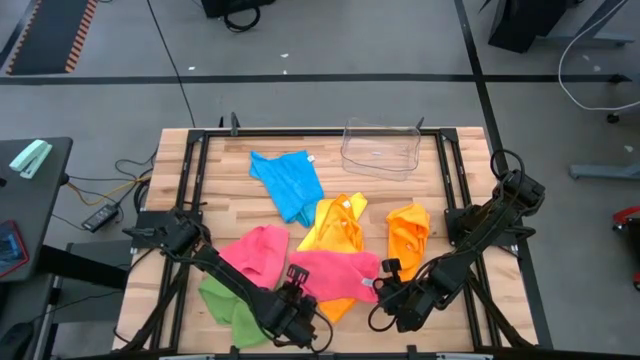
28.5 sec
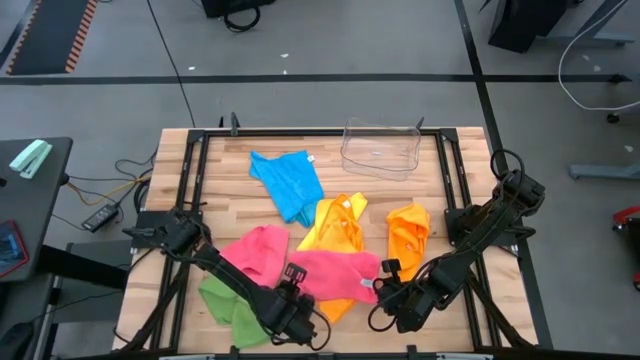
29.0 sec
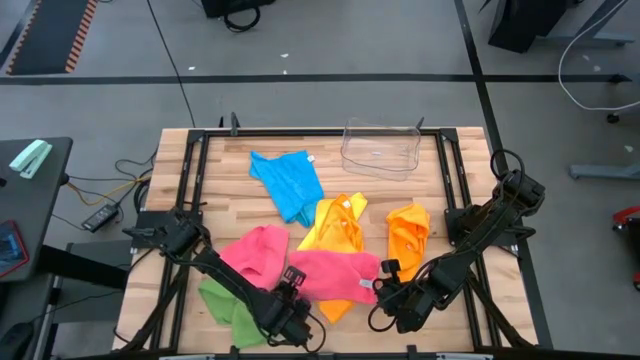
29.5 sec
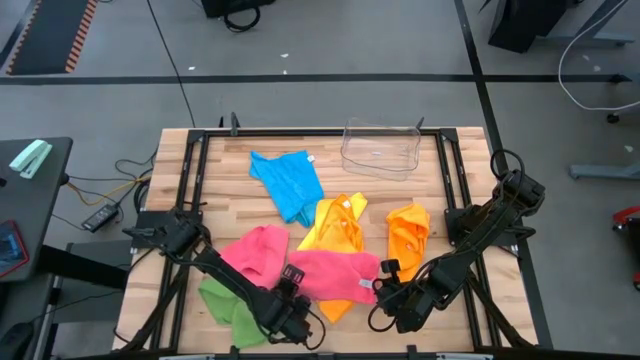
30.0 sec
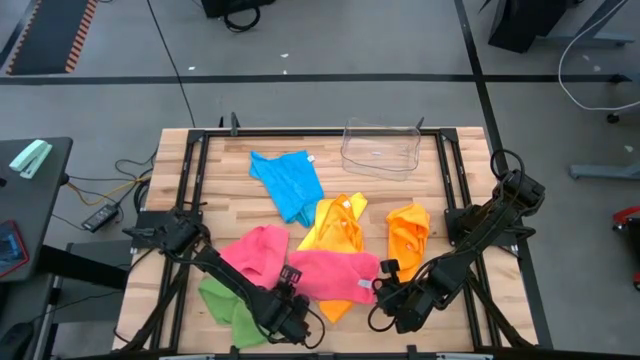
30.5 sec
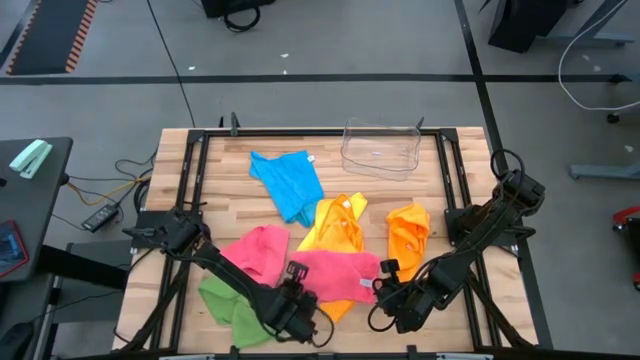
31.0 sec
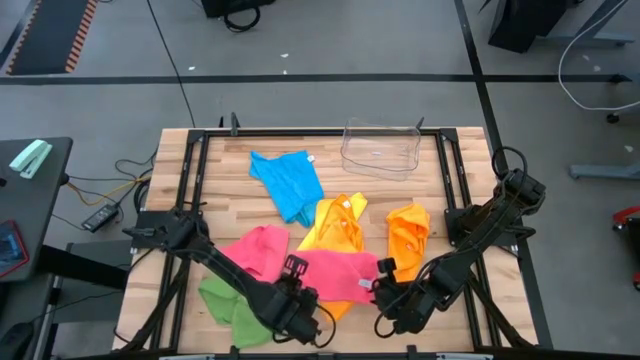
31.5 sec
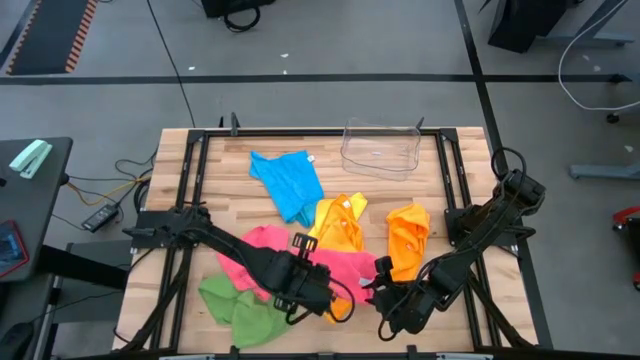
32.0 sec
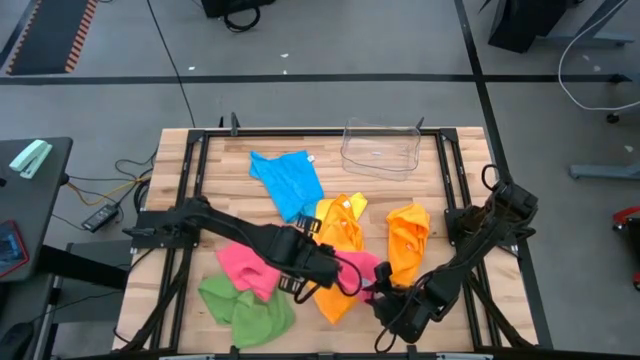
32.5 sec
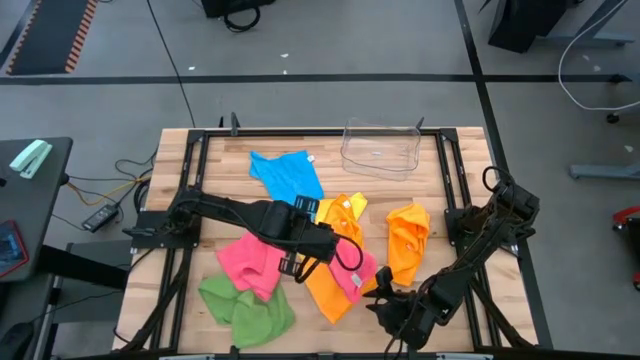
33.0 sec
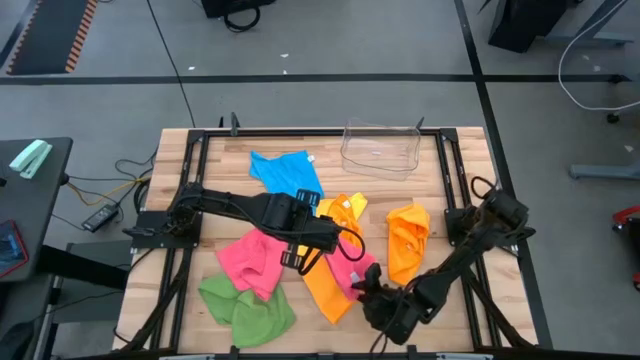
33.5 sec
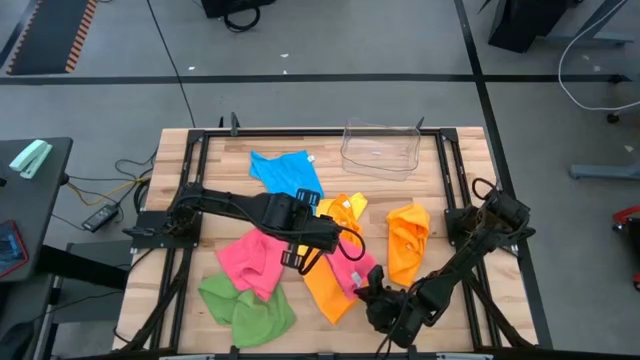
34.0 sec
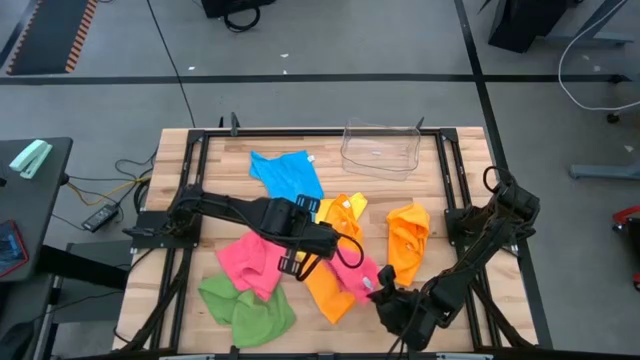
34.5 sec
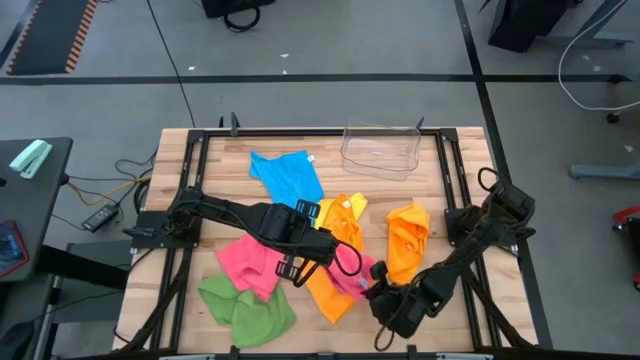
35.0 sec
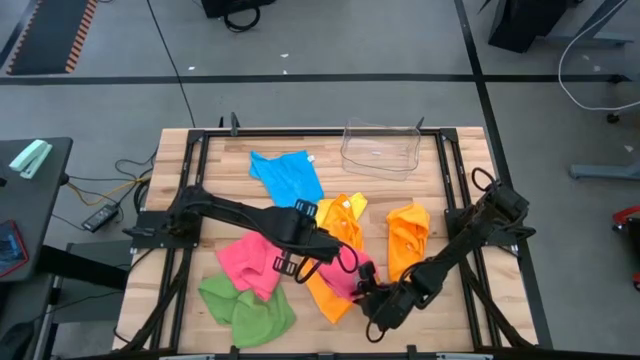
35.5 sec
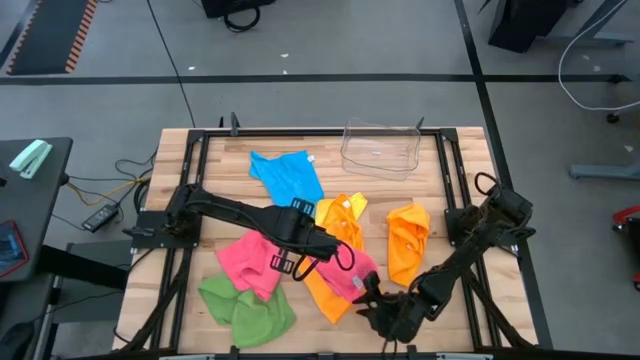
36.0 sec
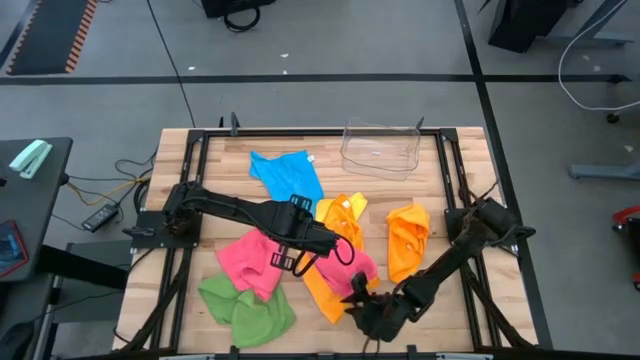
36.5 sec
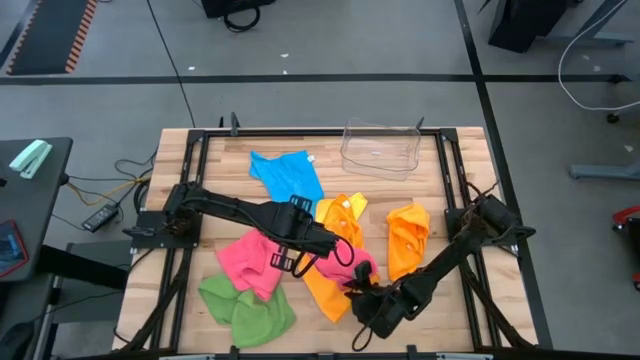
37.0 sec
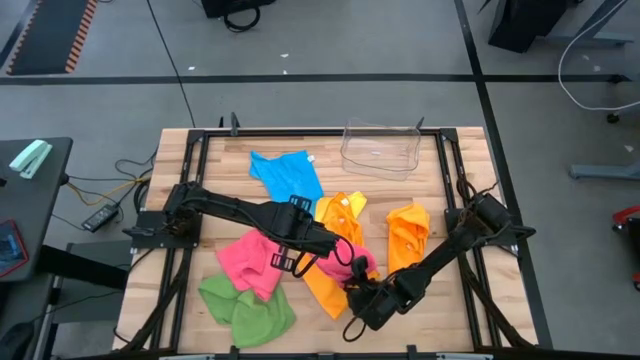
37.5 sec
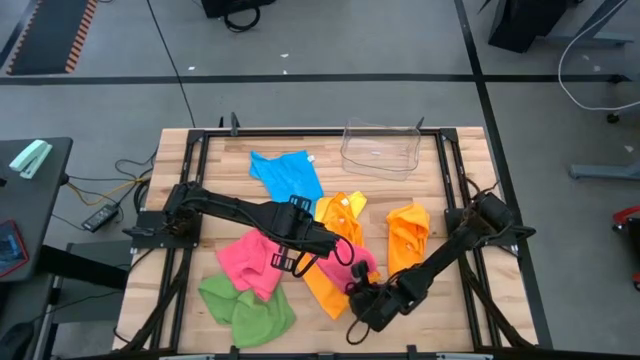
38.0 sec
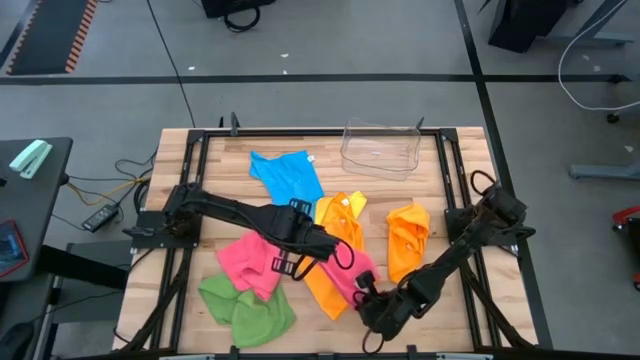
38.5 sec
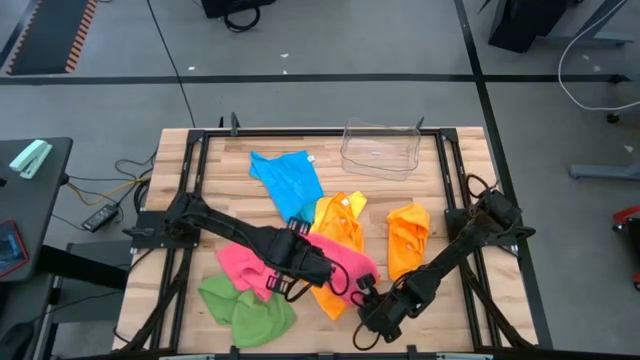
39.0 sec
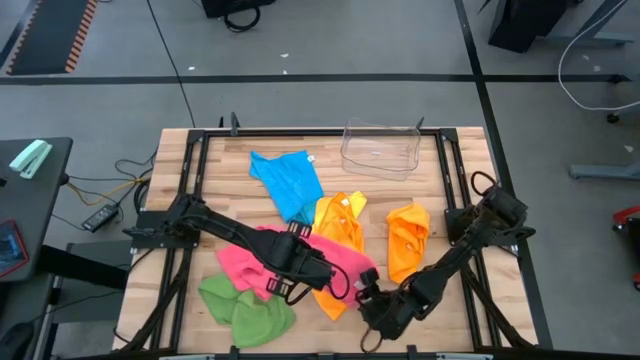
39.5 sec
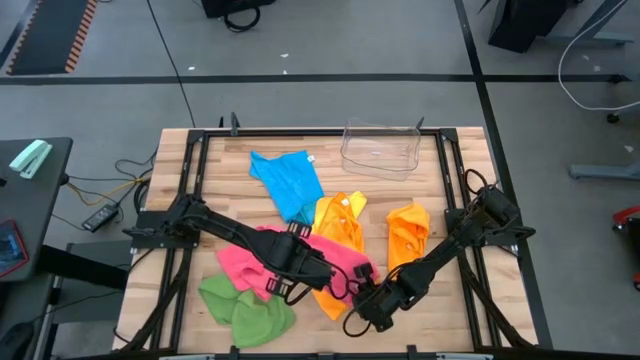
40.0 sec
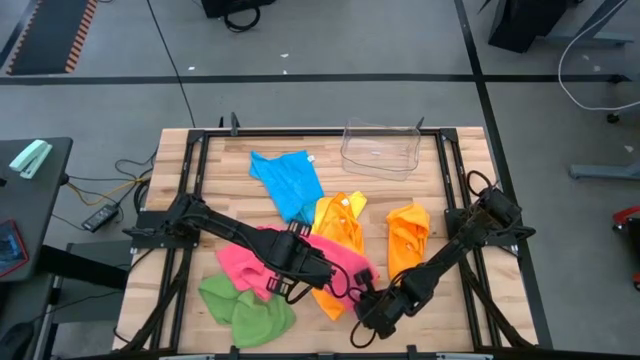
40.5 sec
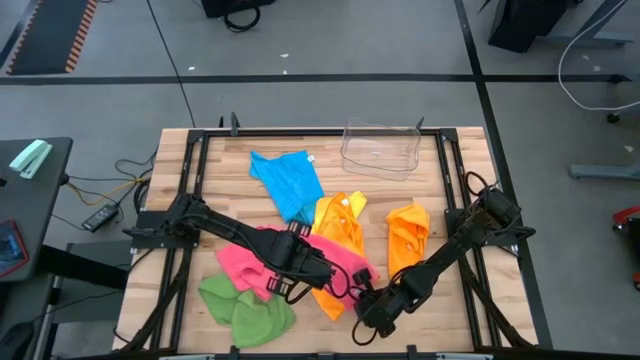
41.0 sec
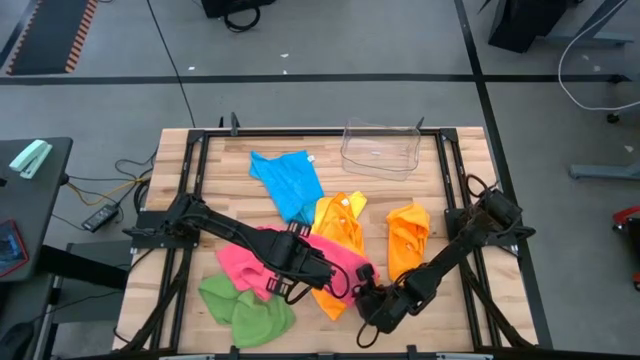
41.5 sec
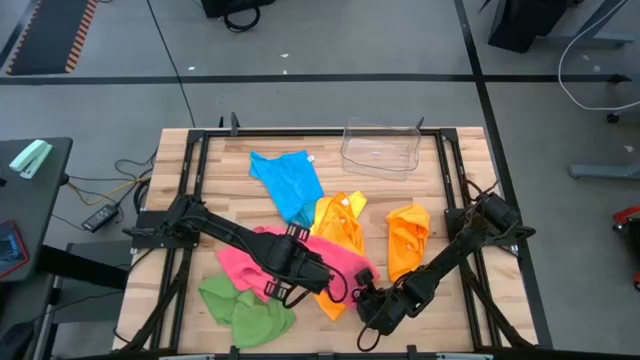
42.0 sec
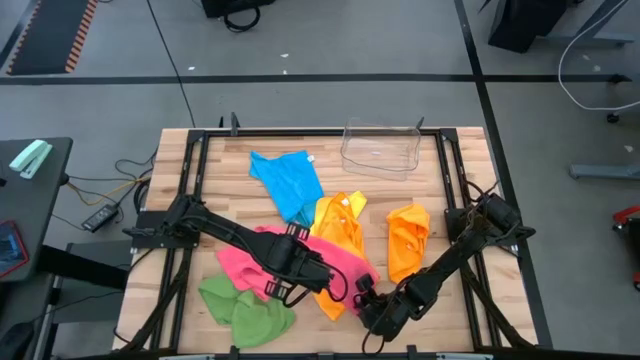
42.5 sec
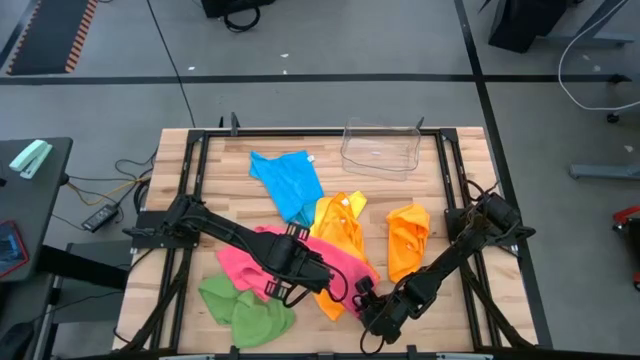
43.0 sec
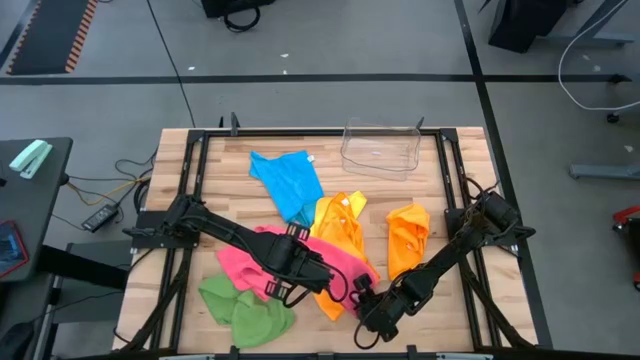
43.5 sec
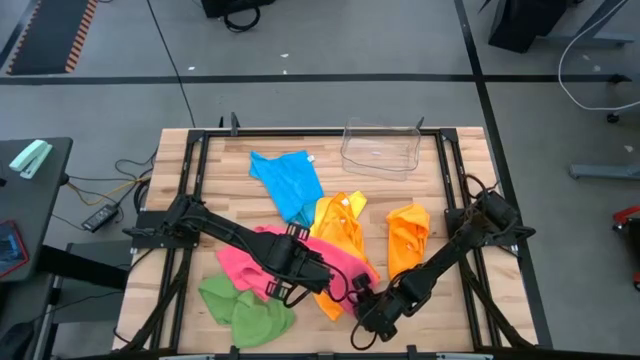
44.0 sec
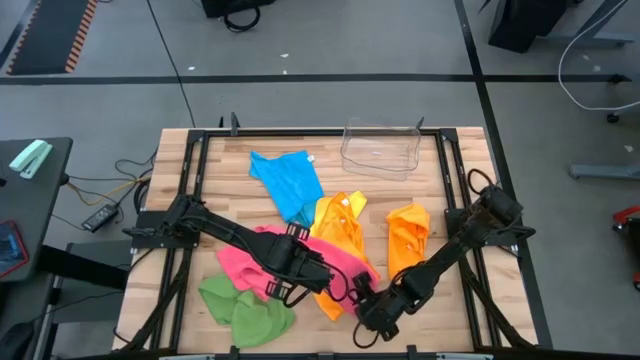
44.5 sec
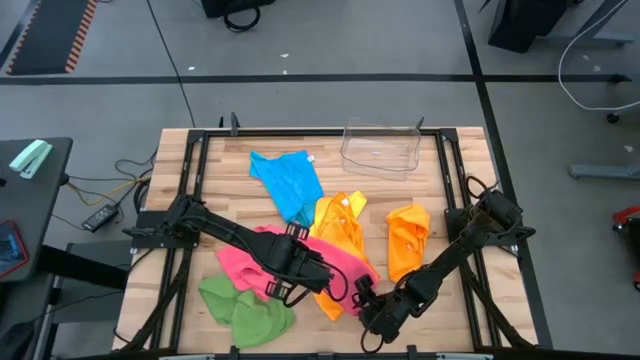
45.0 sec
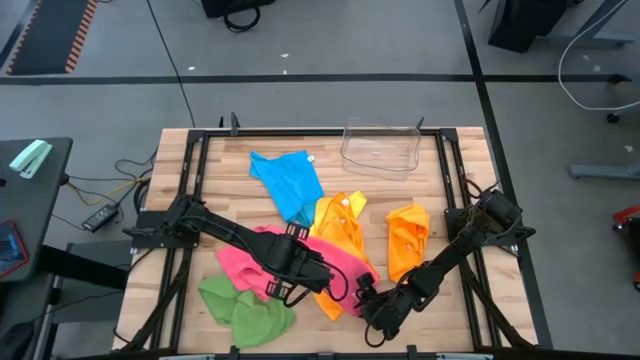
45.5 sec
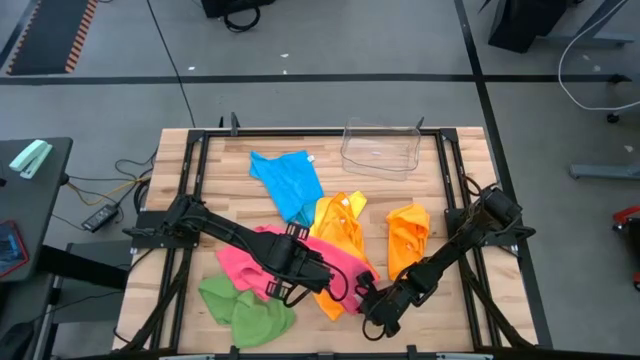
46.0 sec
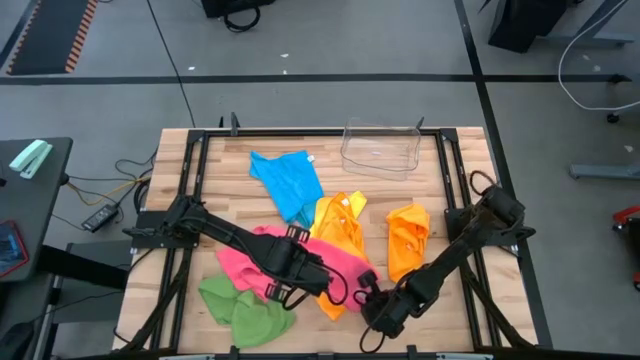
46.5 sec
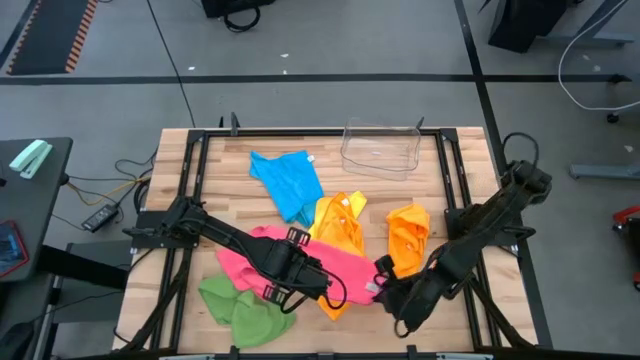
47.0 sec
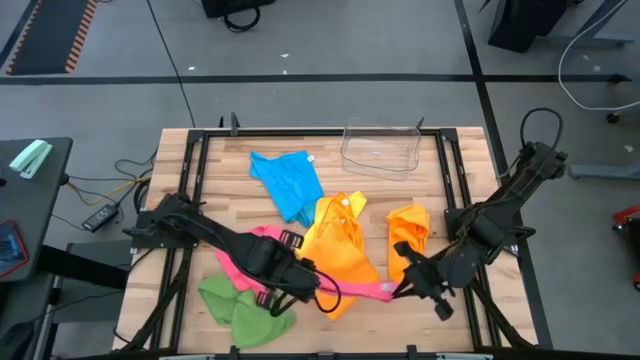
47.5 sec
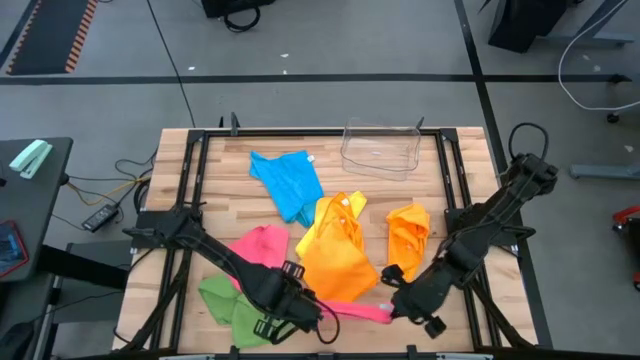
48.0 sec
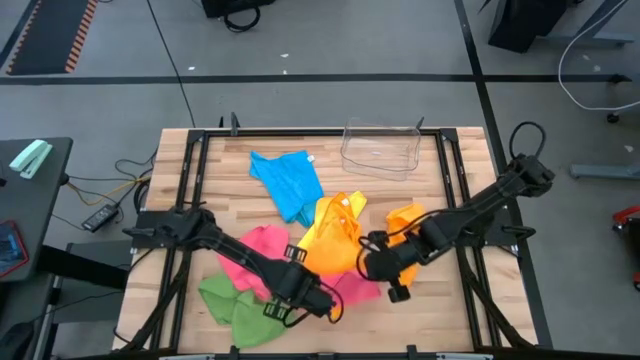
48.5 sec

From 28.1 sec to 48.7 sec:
Task: Fold microfiber towels
Fold the top pink microfiber cloth
